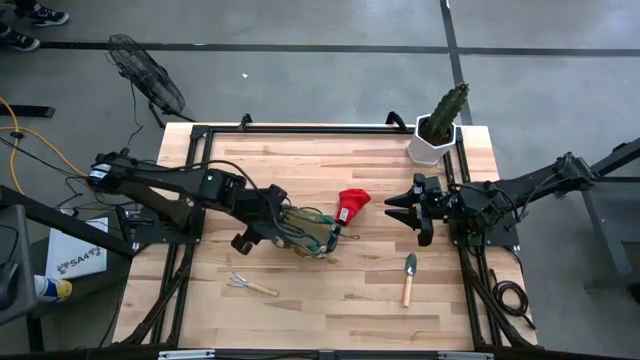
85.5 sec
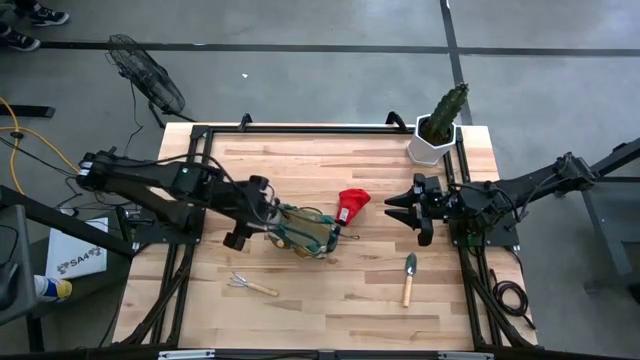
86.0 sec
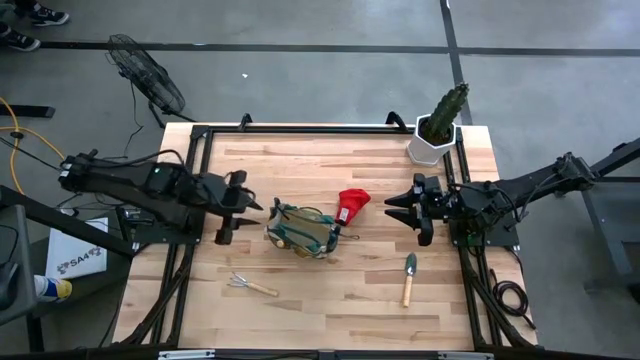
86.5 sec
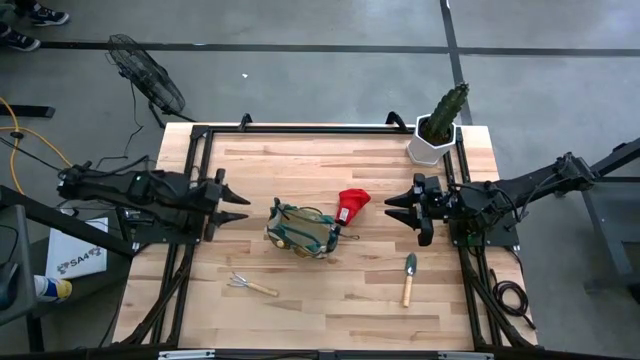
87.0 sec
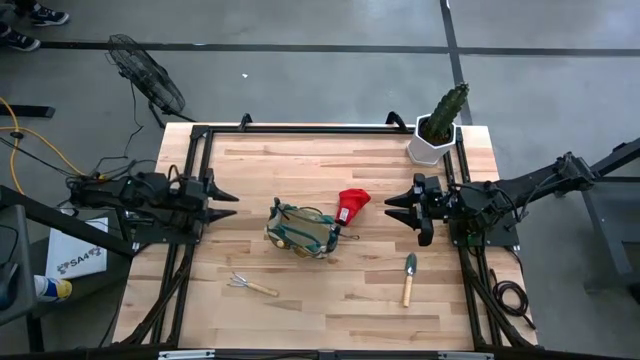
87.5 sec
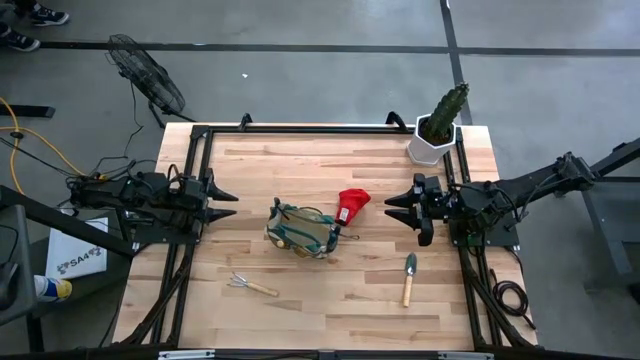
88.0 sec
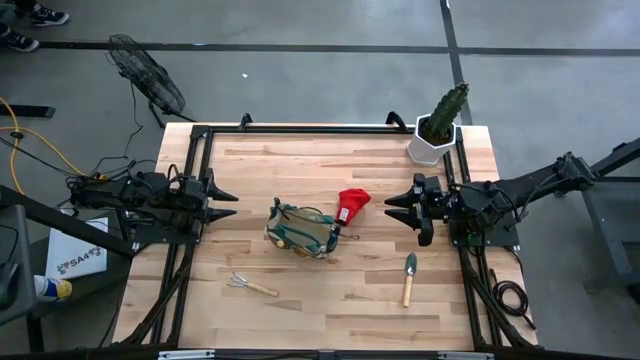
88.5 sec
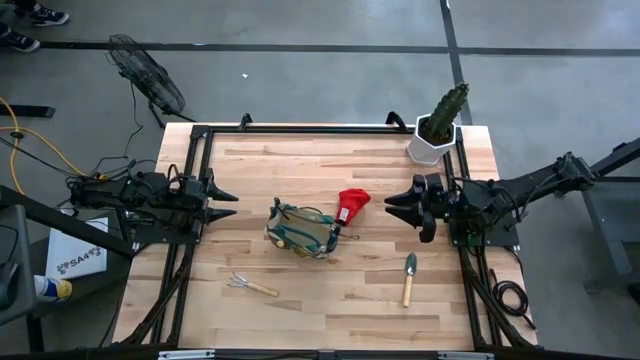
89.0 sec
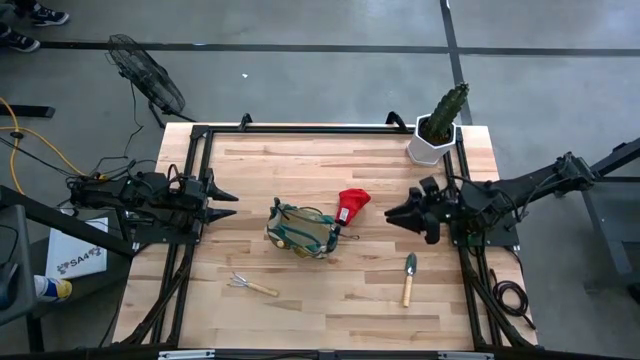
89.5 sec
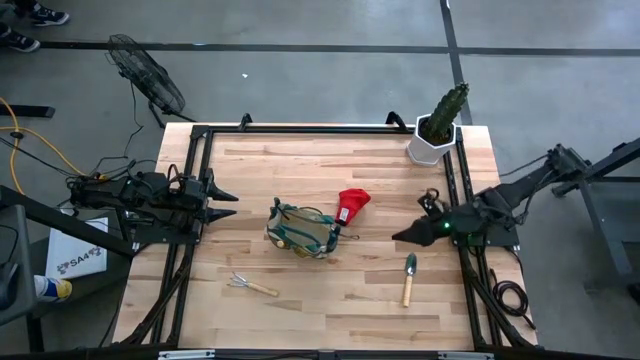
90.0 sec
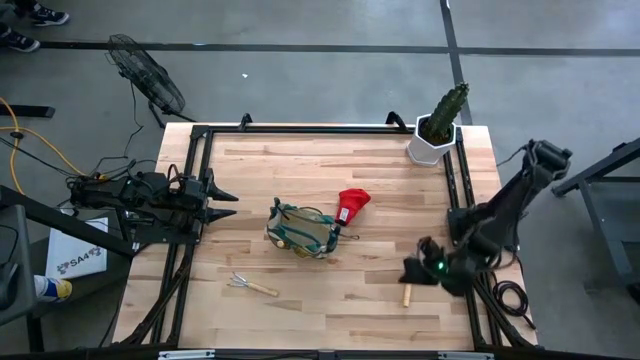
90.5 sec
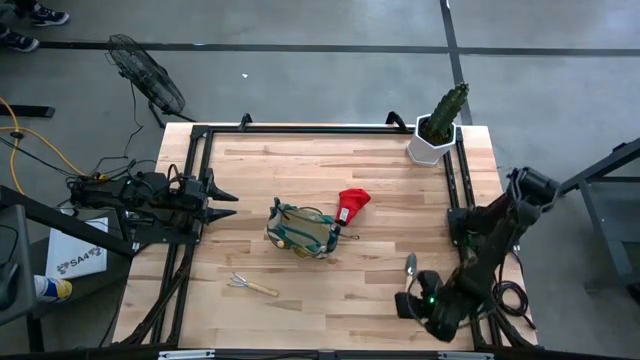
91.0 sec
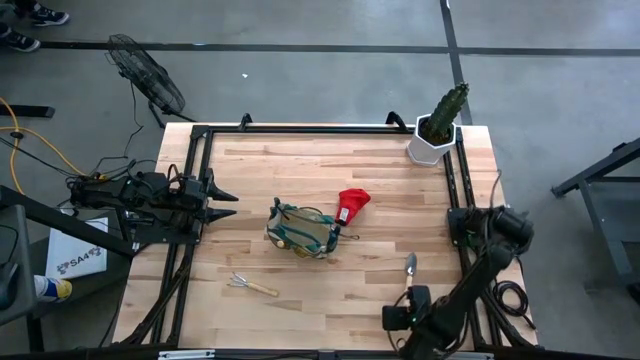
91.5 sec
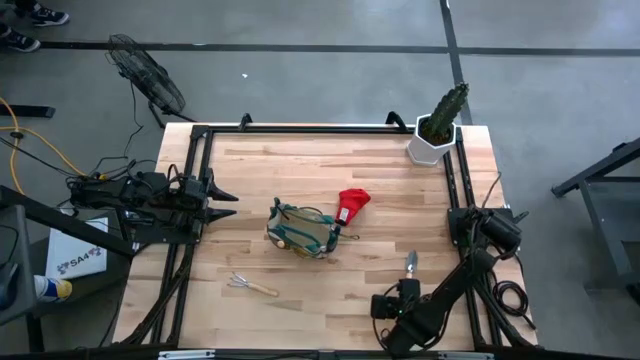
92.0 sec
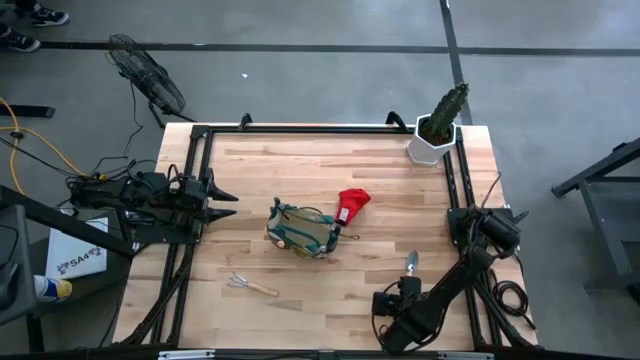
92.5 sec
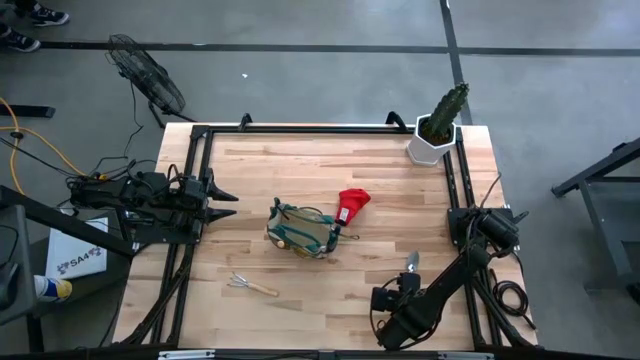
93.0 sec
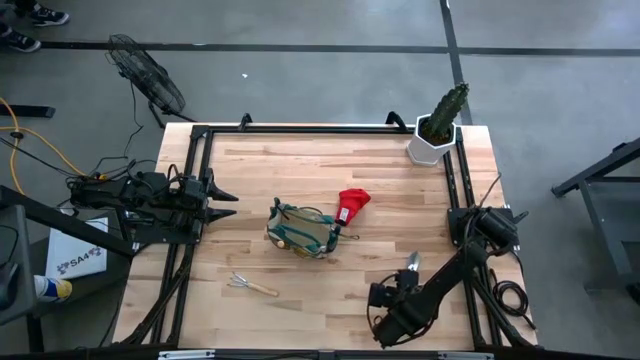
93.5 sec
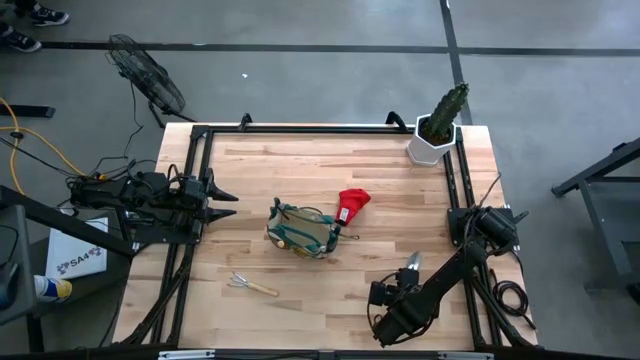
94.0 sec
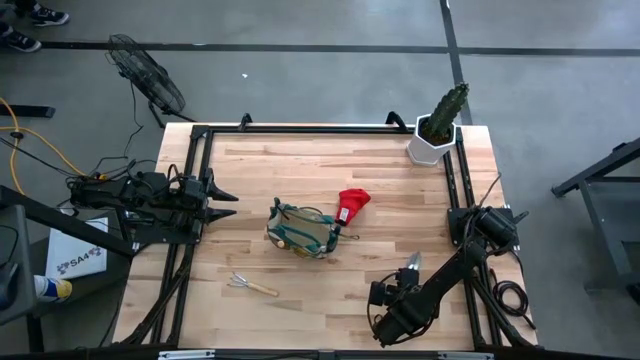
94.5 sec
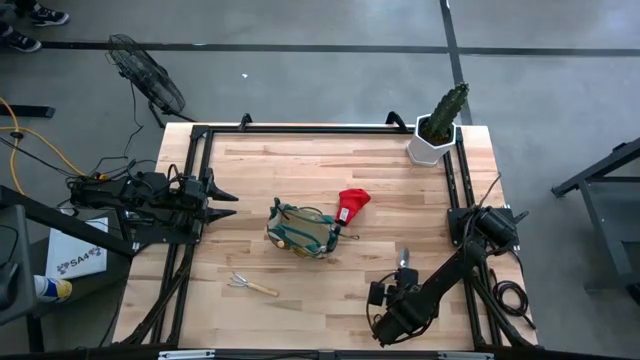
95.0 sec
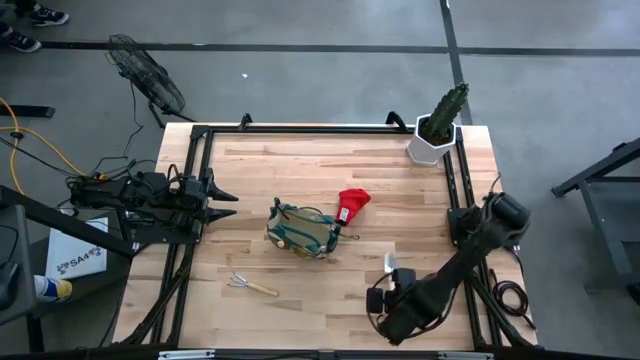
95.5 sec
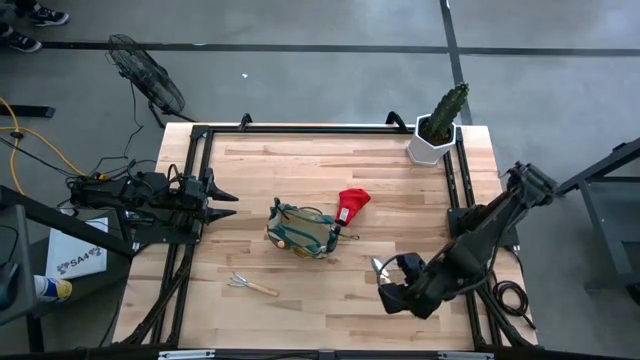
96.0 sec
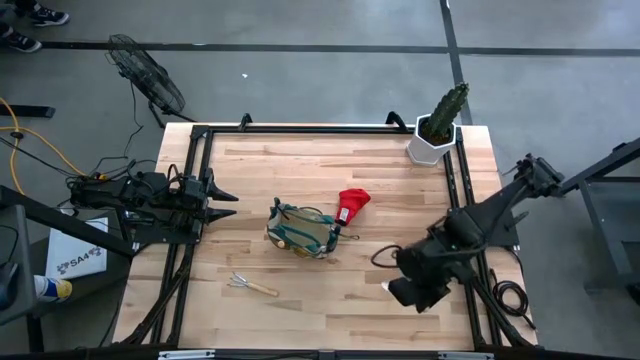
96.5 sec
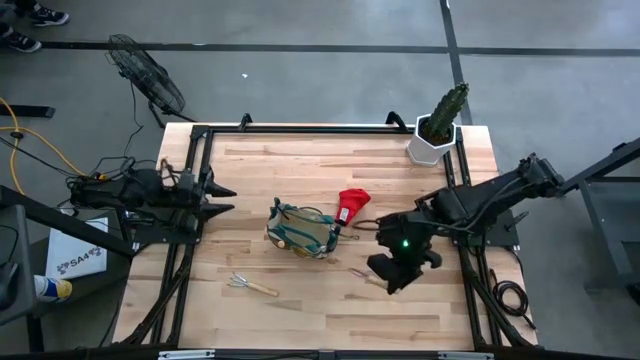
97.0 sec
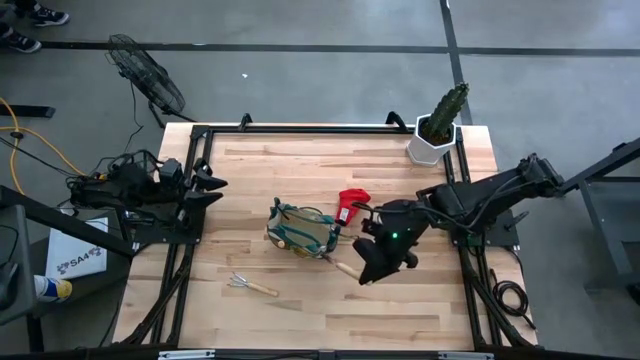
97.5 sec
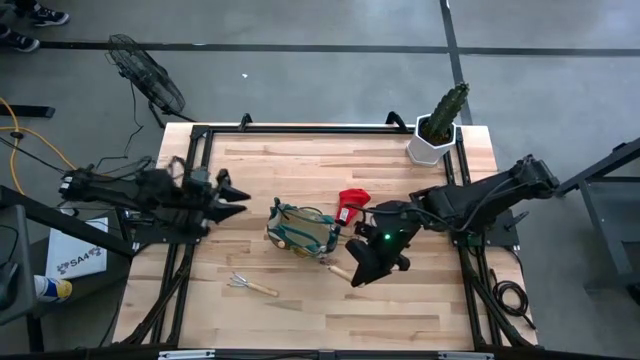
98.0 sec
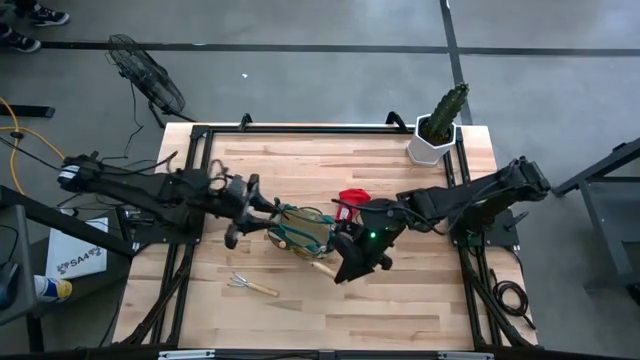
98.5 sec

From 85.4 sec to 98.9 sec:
Task: Pick & Place Garden tools in Gardening bag
Put the light brown trowel into the gardening bag

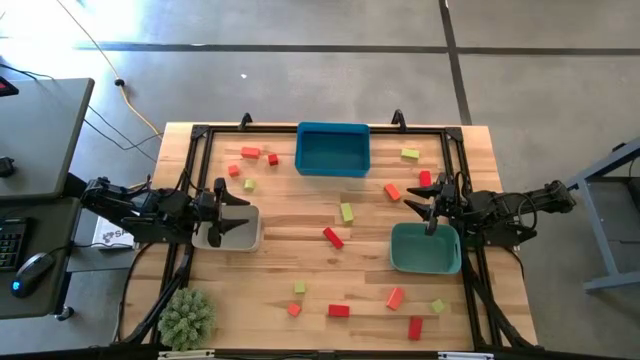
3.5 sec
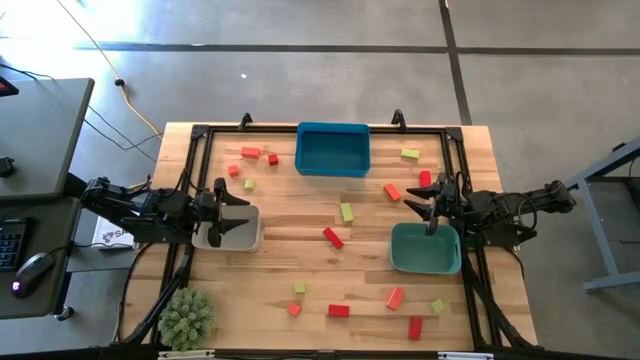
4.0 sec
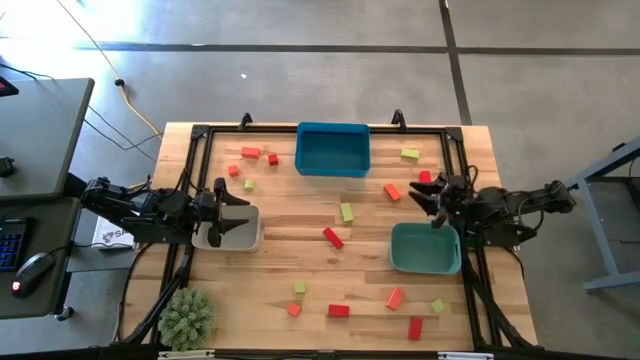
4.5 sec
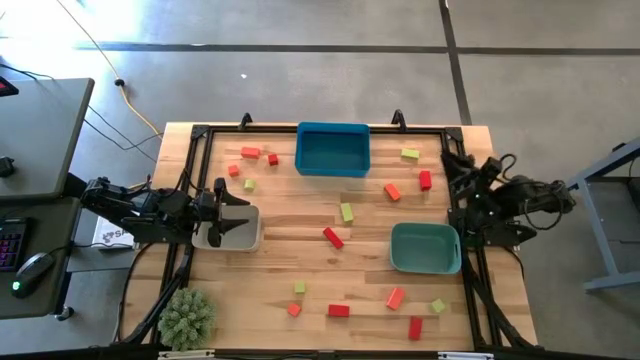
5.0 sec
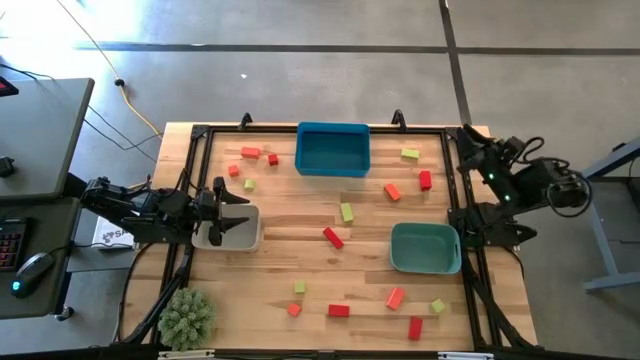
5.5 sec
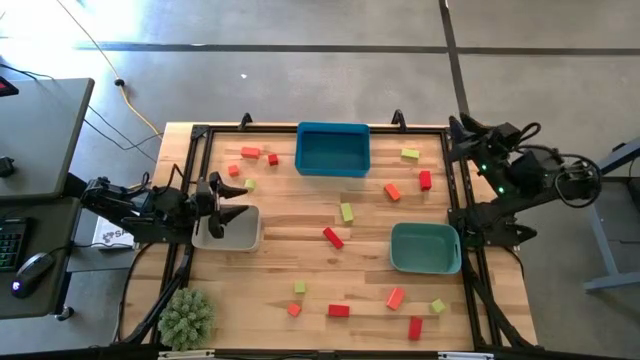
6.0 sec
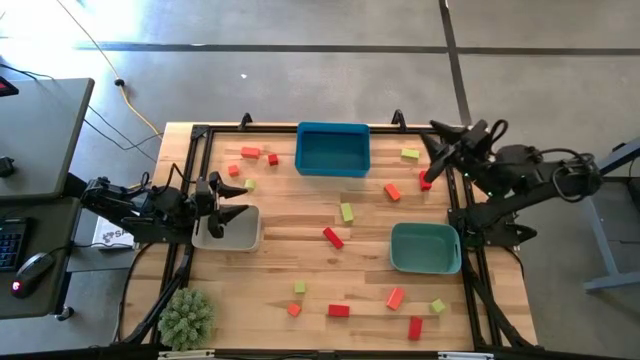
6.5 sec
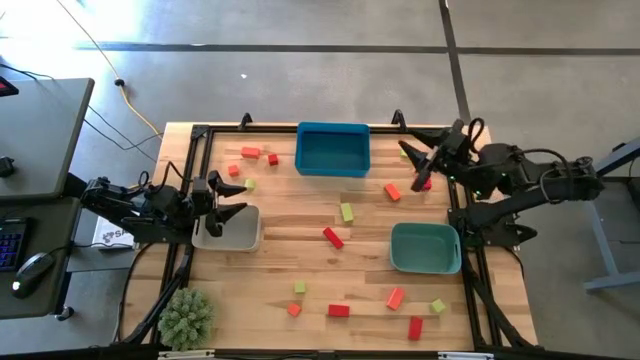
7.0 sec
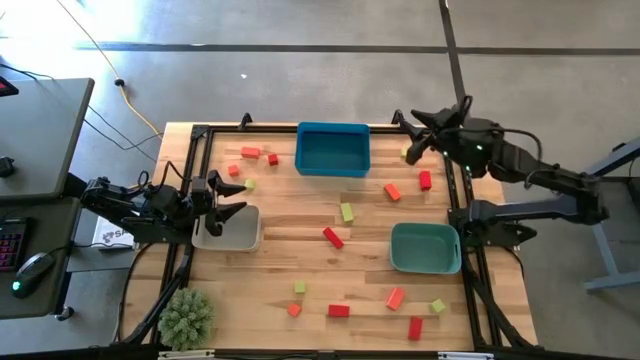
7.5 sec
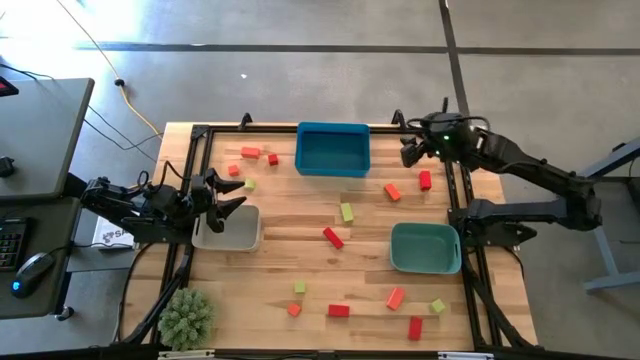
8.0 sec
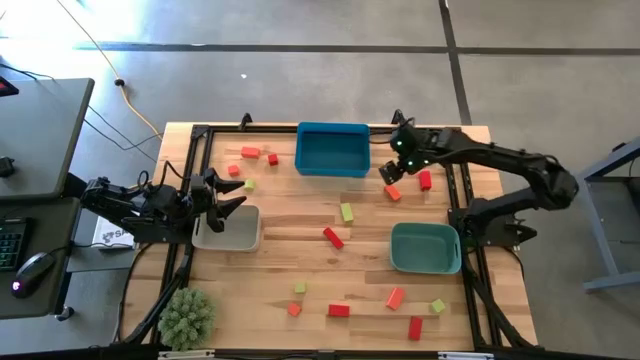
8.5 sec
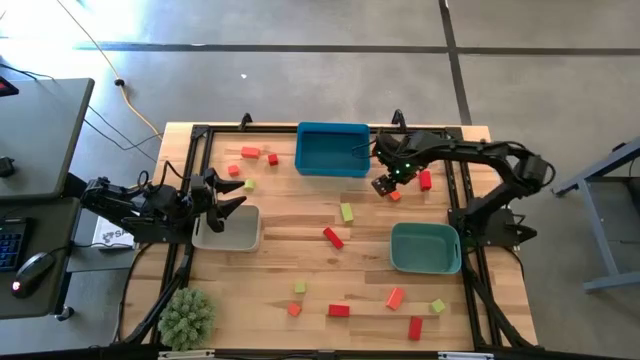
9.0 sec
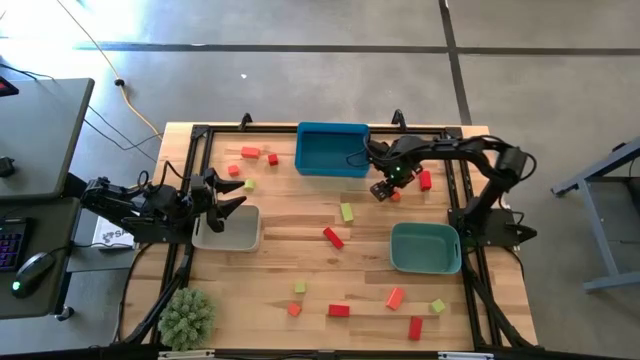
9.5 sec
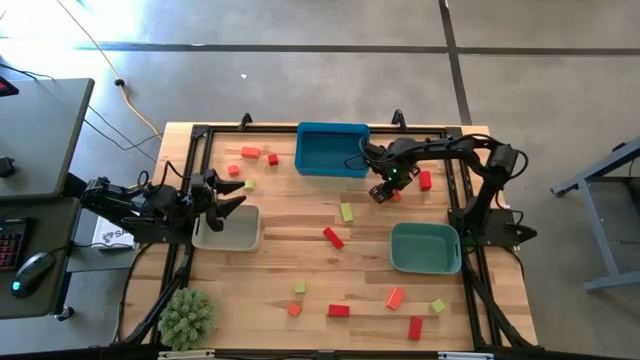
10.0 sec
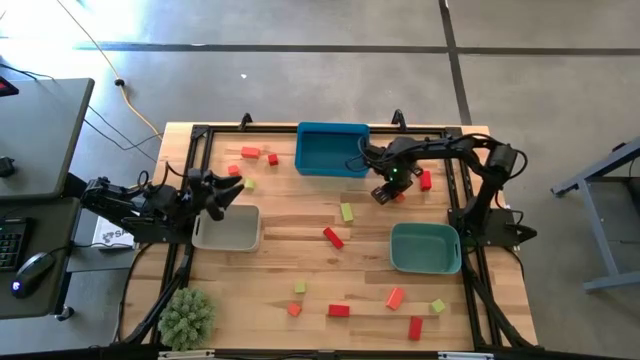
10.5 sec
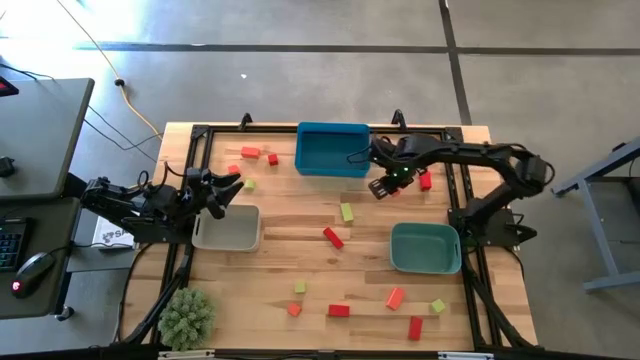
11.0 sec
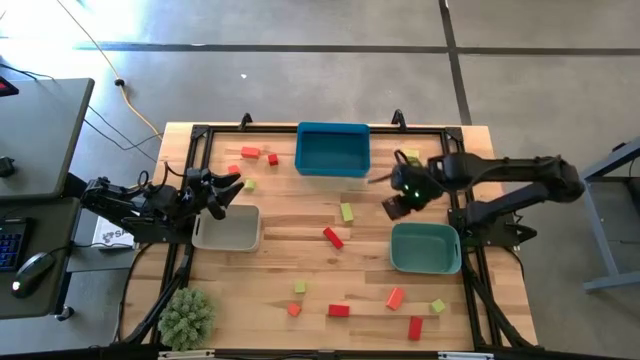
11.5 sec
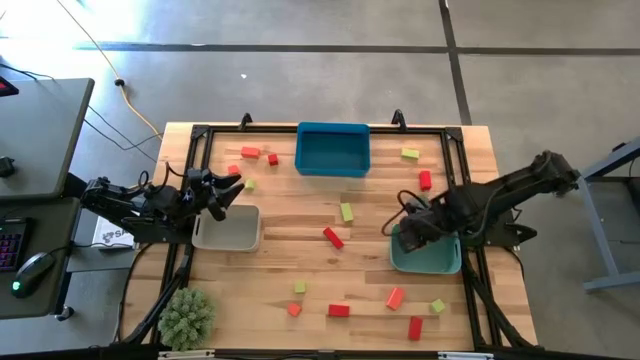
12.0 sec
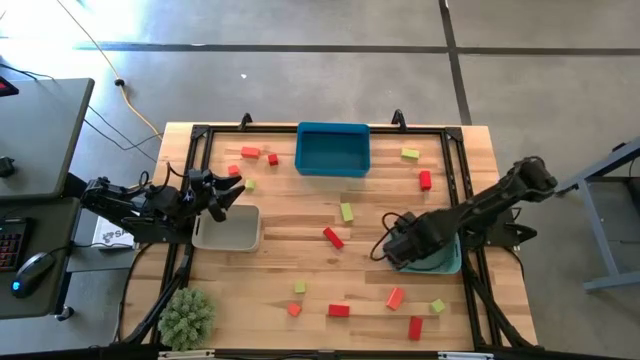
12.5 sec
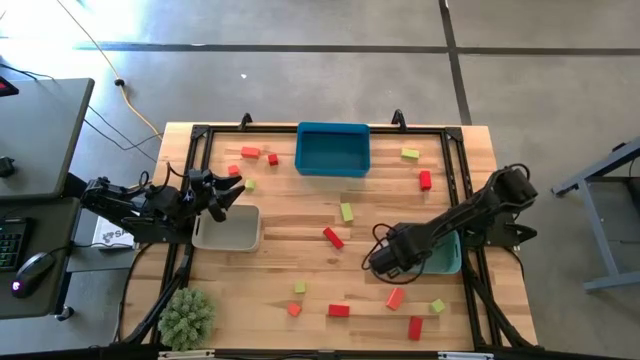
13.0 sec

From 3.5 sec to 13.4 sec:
Task: Sort & place blocks by color
Put the orange block into the green bin
